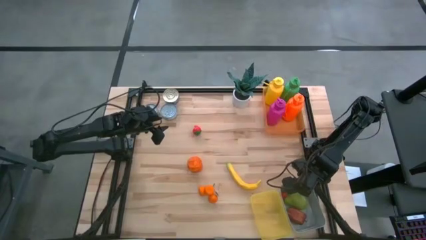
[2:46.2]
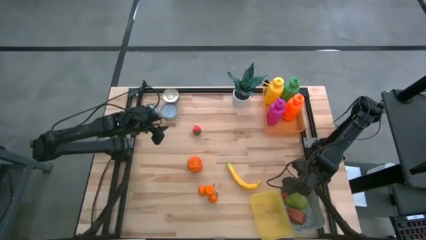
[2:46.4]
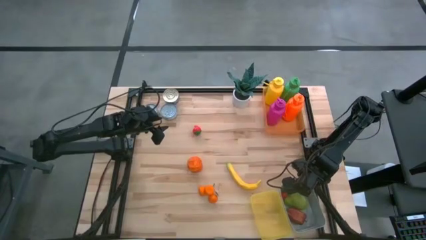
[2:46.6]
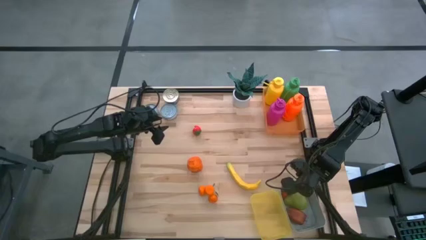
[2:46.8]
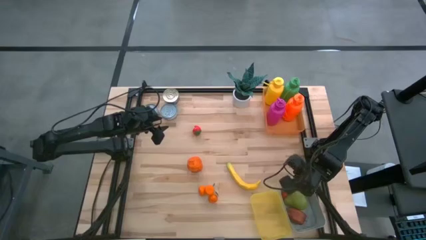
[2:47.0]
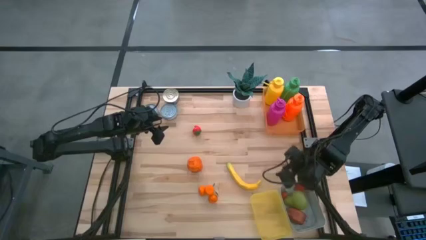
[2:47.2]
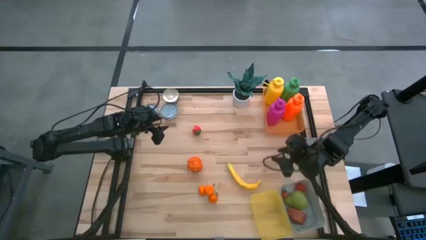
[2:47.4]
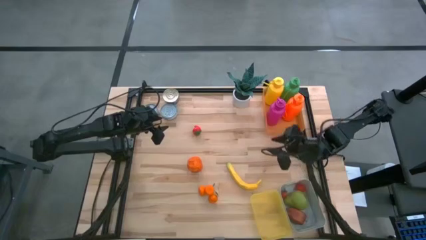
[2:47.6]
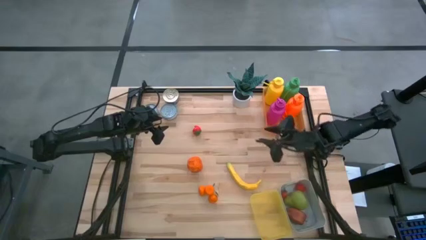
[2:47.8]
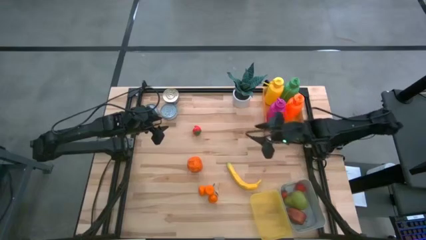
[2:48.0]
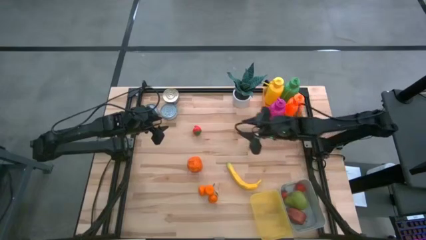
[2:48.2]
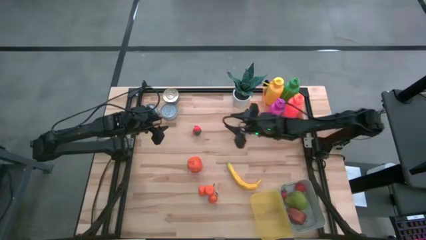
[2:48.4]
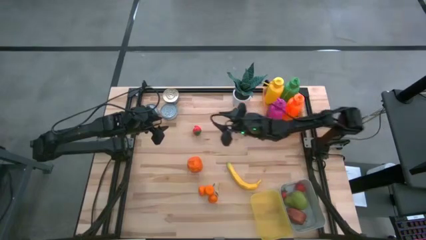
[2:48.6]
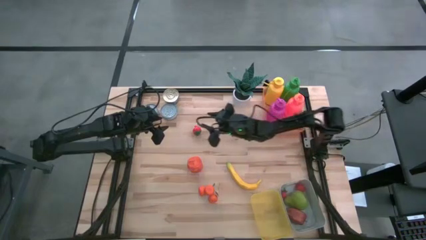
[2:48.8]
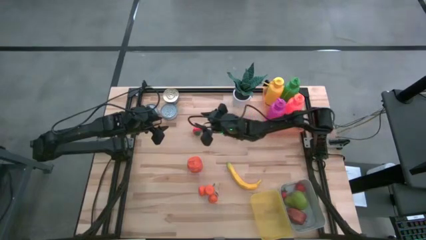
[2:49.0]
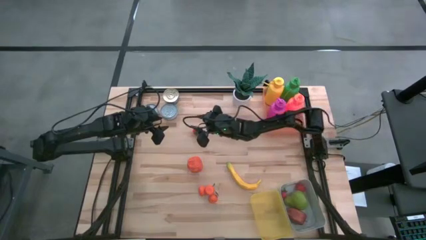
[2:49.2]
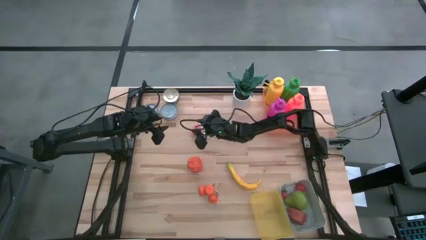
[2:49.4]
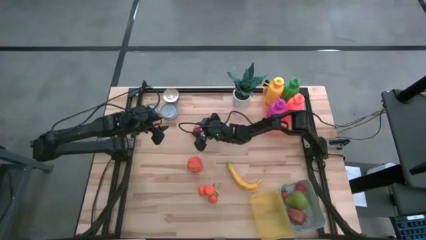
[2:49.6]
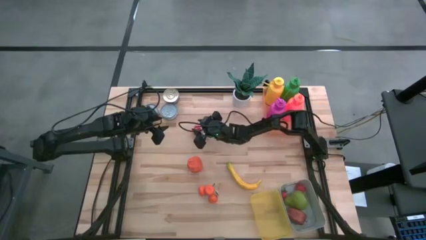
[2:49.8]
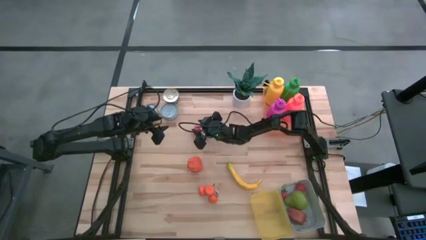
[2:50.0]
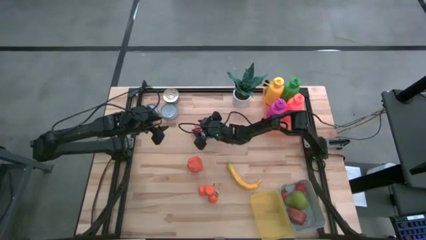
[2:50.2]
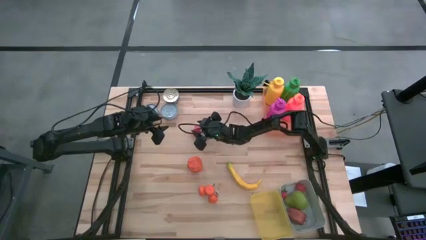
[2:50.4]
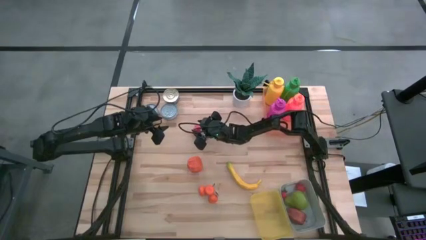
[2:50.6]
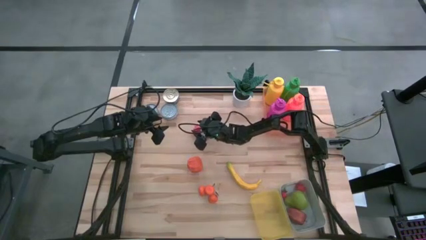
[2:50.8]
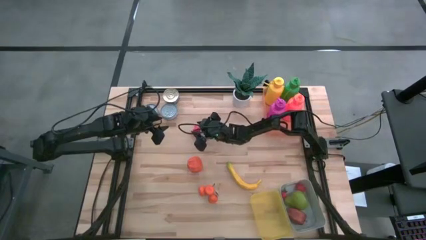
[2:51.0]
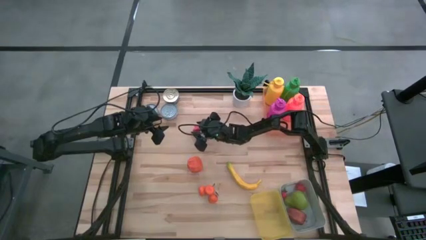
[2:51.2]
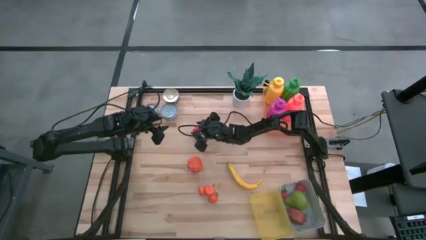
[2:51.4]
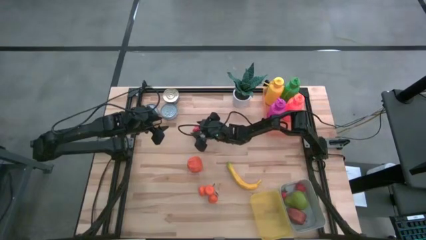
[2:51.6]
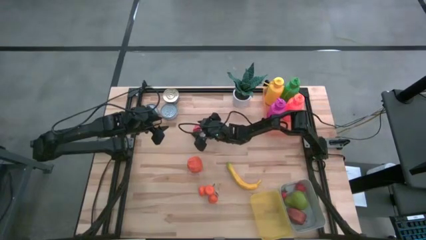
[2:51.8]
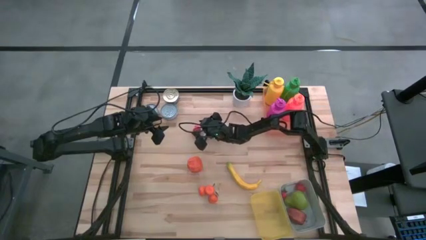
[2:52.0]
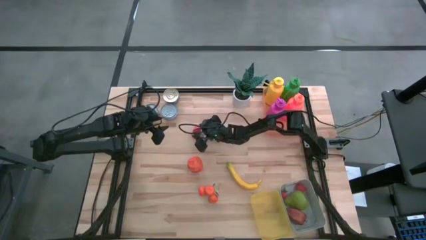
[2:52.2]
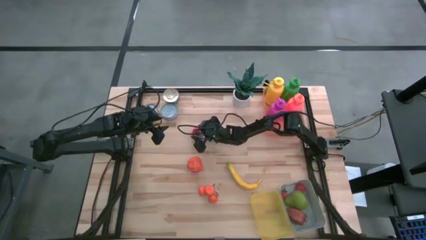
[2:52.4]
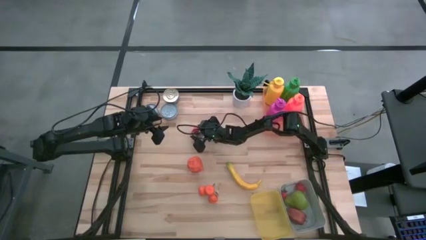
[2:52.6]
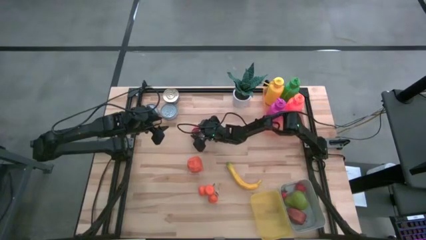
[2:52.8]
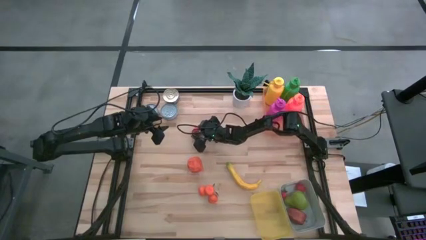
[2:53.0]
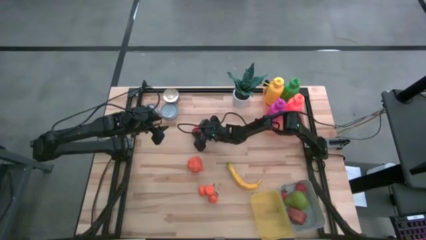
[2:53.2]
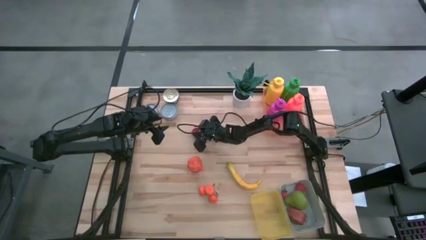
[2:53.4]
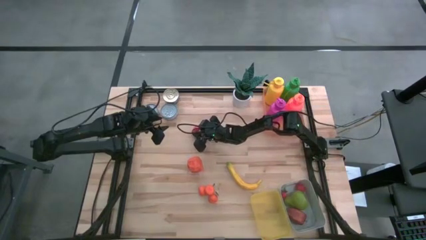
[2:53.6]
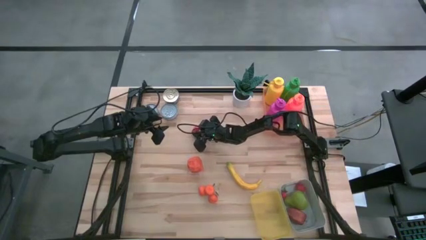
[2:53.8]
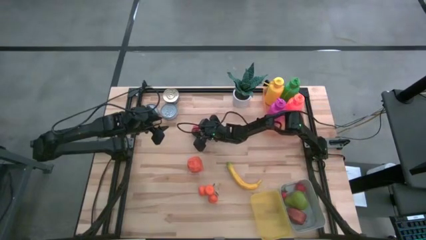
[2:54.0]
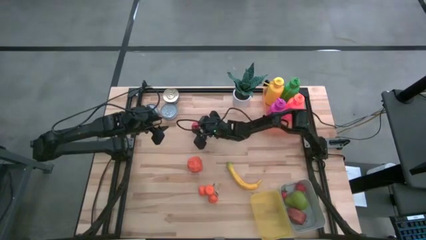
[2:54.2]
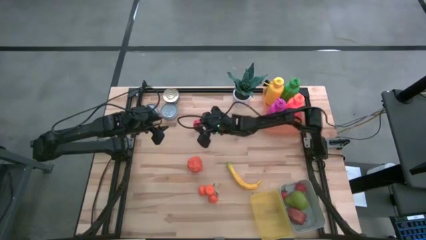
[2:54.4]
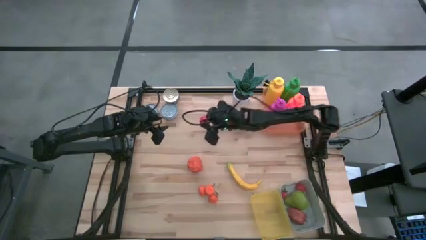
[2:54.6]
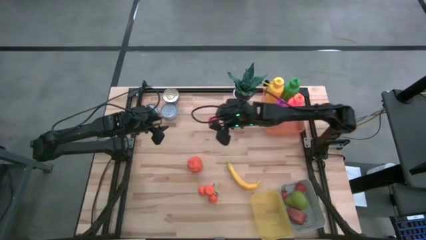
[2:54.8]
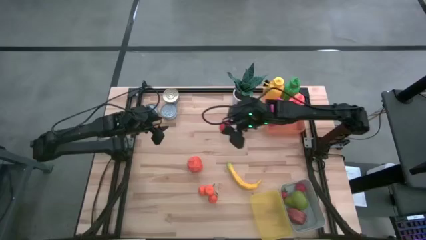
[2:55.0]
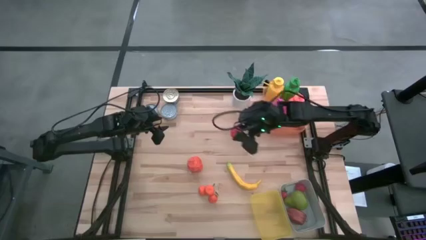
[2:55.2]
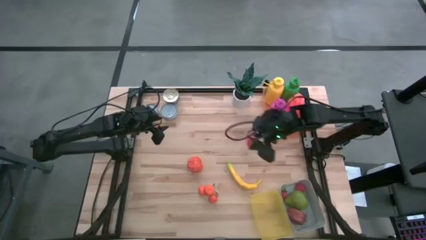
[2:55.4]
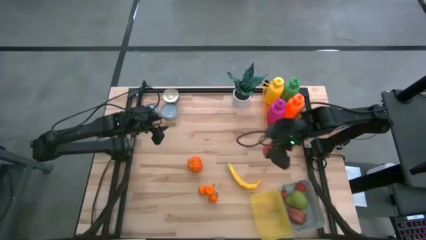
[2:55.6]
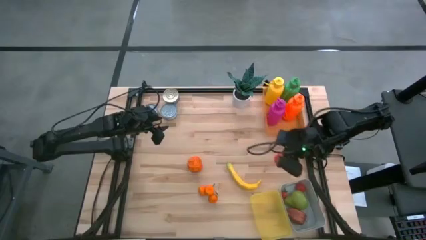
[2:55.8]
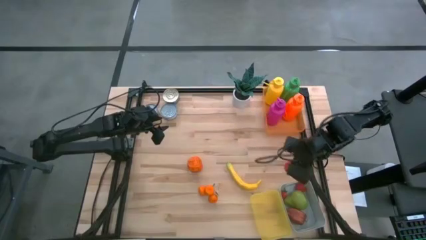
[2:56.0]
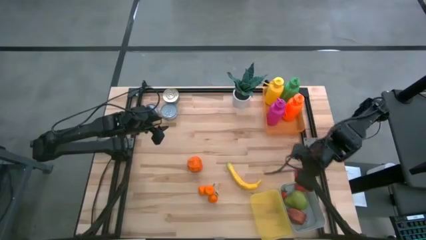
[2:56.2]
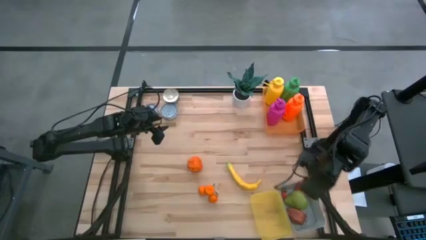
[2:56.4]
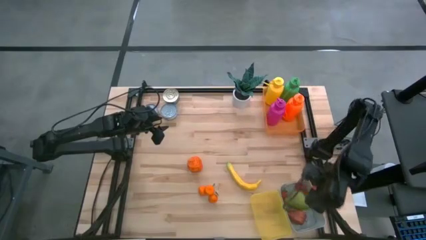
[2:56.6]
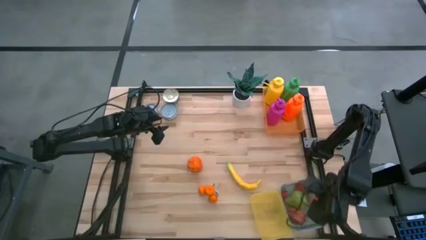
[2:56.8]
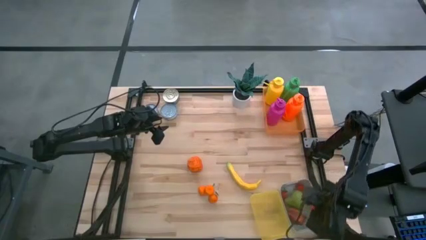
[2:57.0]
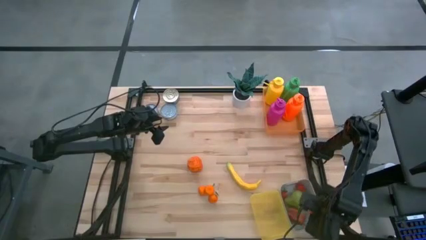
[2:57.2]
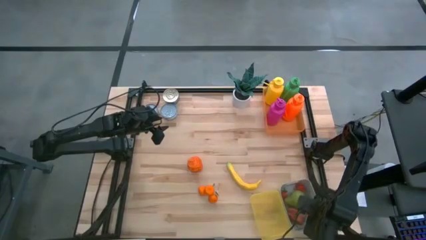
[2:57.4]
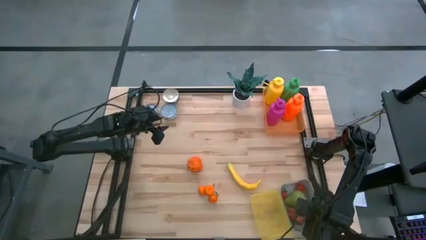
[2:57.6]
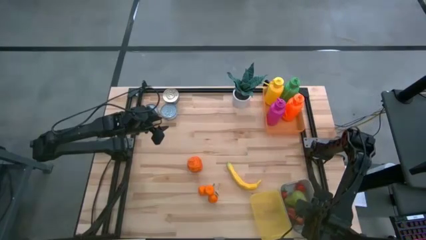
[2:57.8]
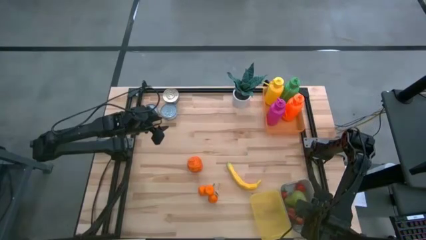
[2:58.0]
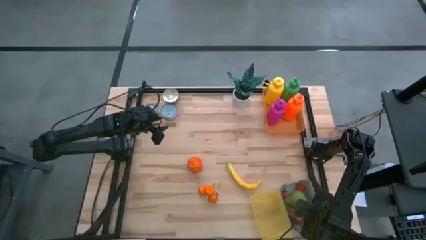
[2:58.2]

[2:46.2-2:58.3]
Task: Pick & Place Food Item
Put the red strawberry into the gray bin
